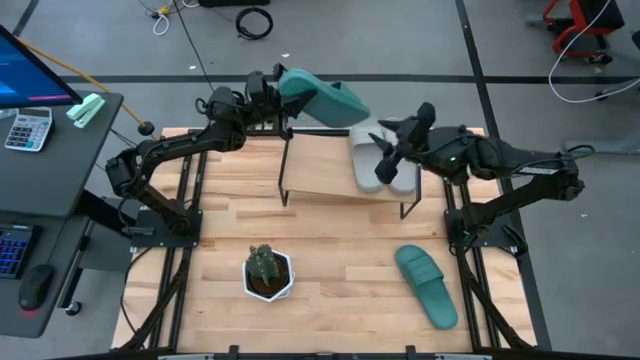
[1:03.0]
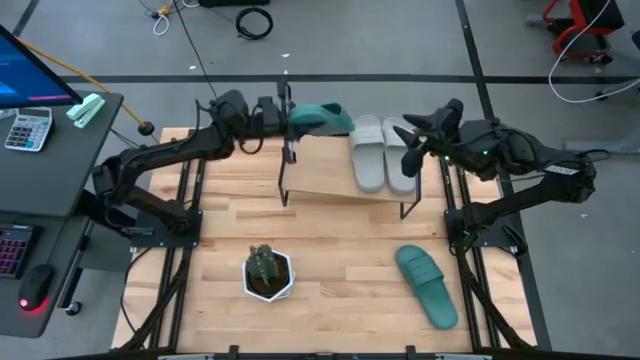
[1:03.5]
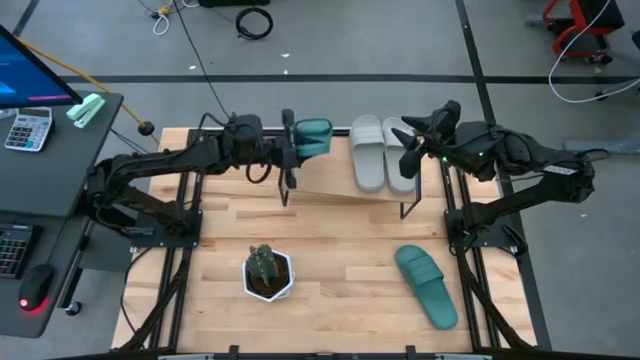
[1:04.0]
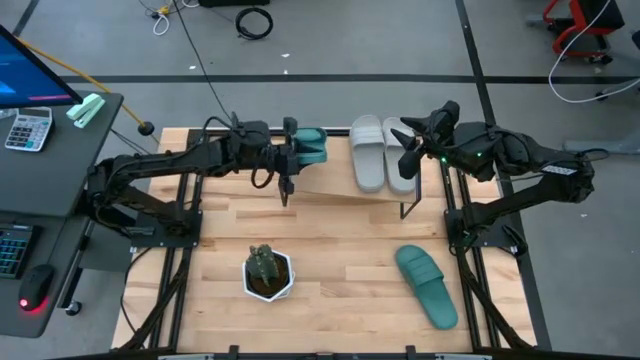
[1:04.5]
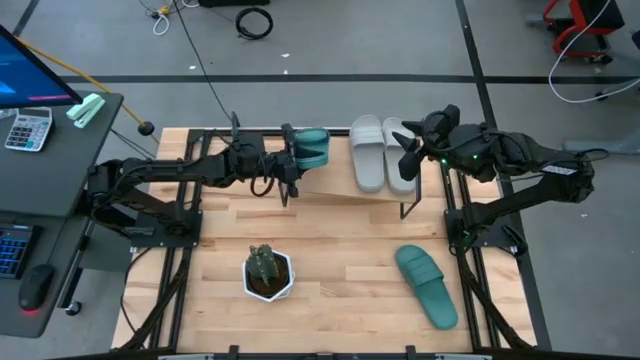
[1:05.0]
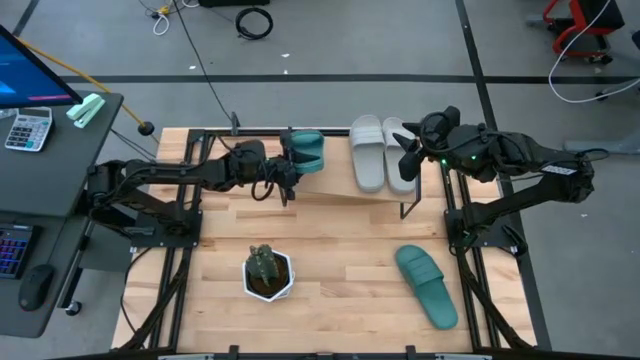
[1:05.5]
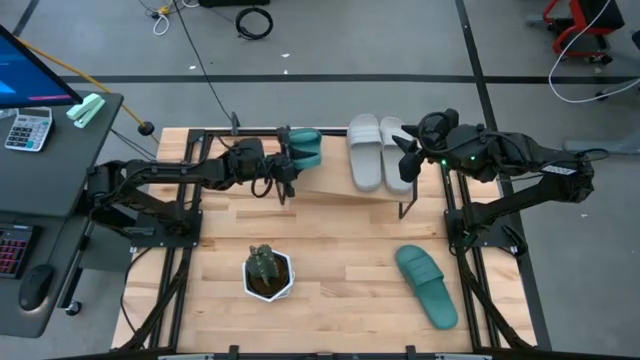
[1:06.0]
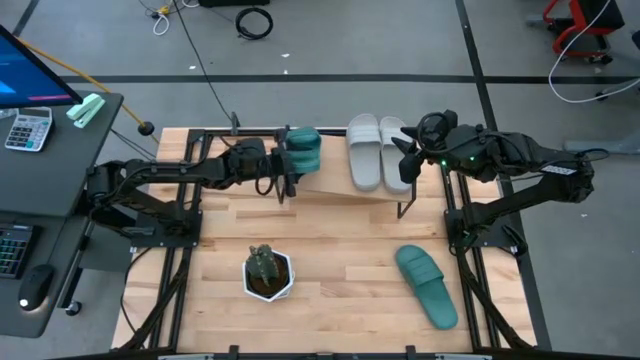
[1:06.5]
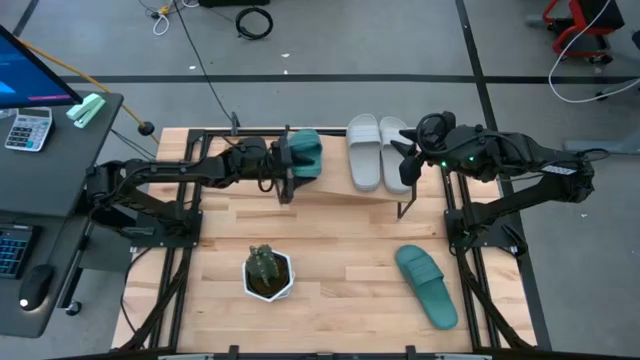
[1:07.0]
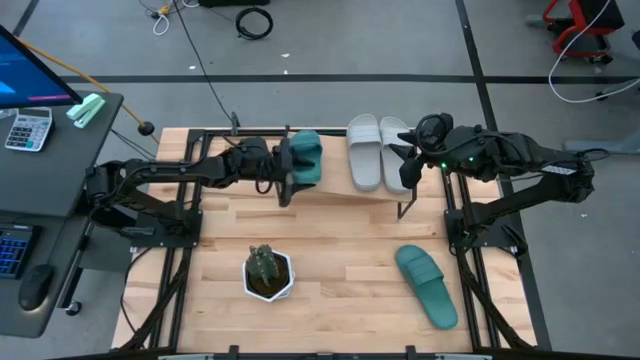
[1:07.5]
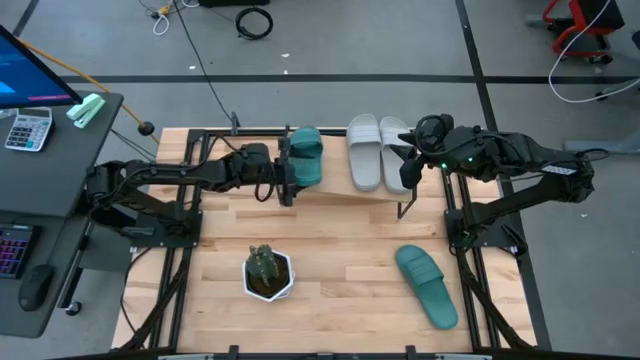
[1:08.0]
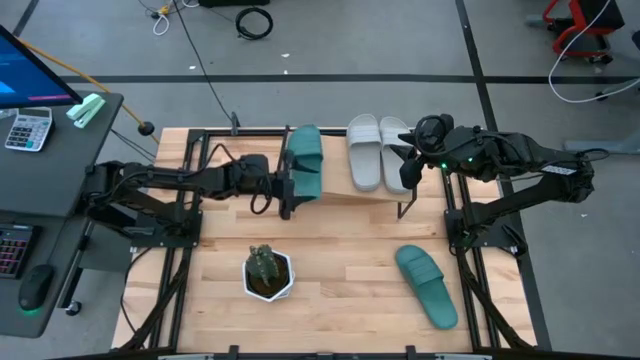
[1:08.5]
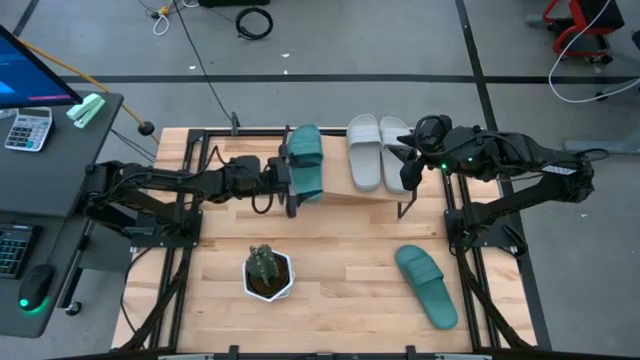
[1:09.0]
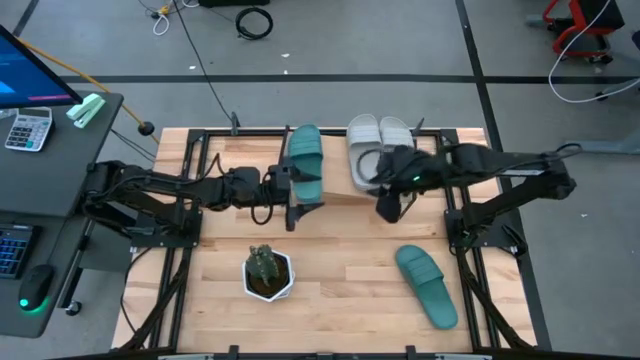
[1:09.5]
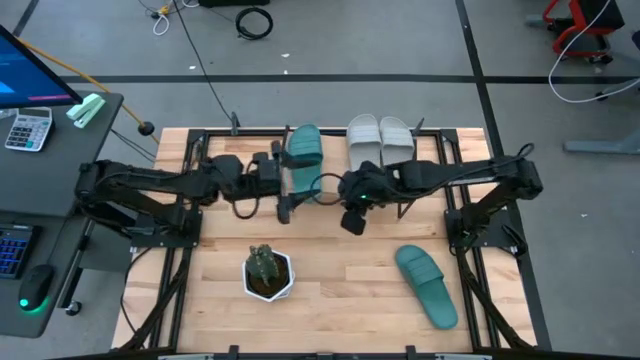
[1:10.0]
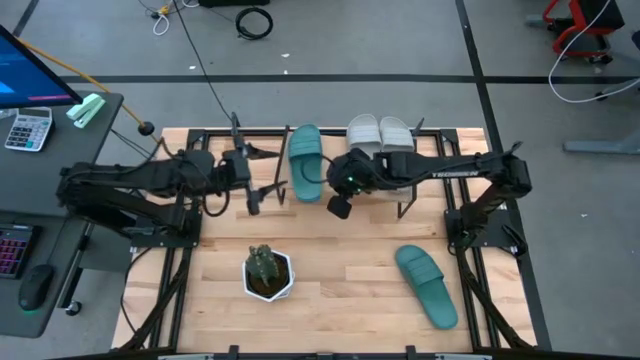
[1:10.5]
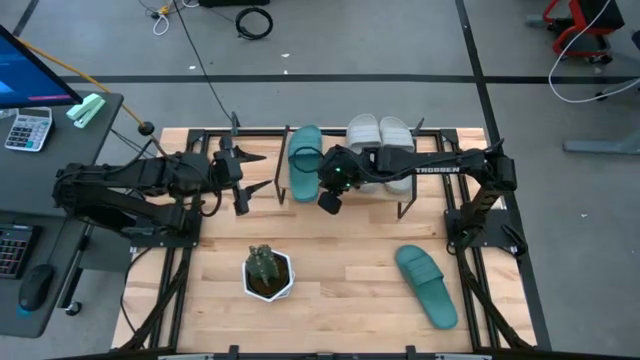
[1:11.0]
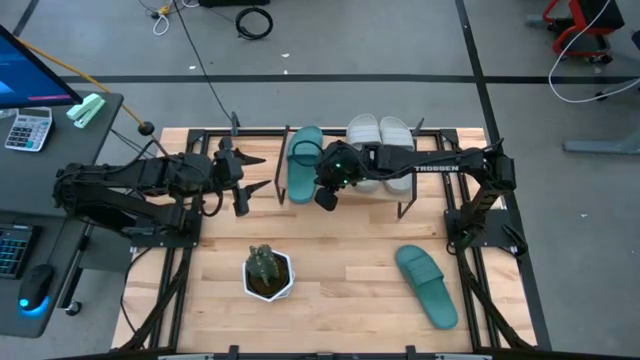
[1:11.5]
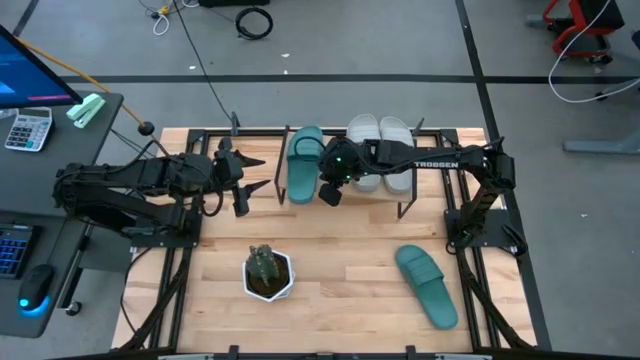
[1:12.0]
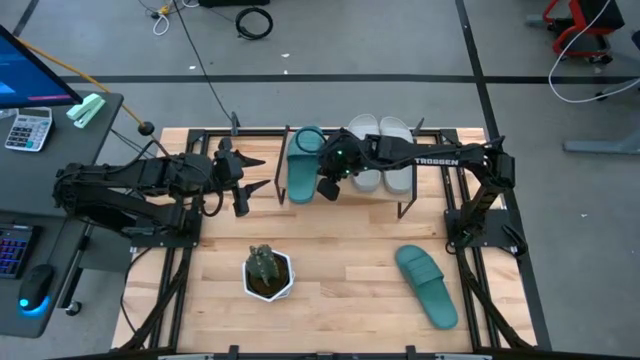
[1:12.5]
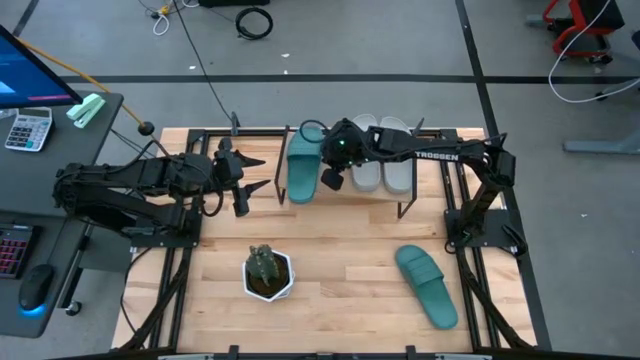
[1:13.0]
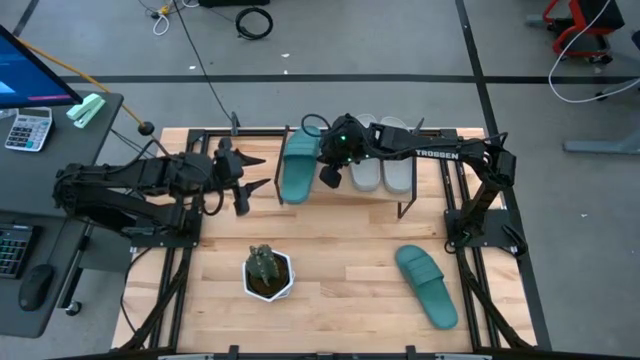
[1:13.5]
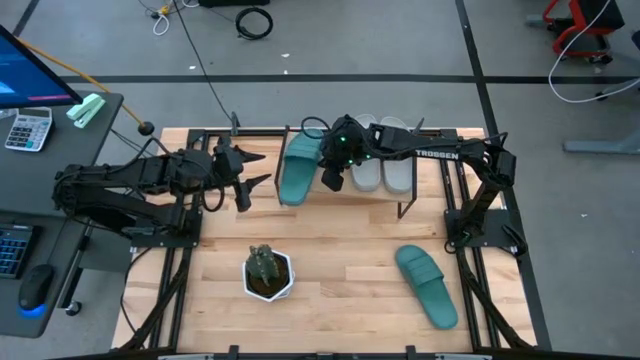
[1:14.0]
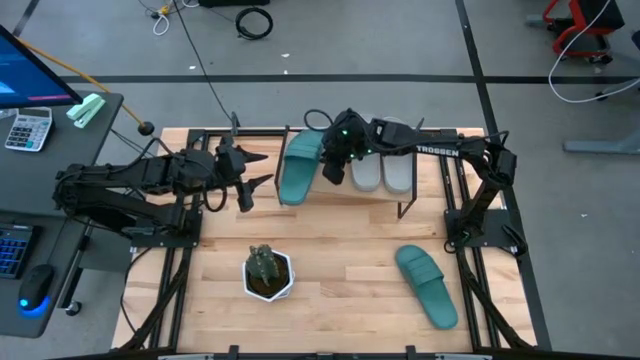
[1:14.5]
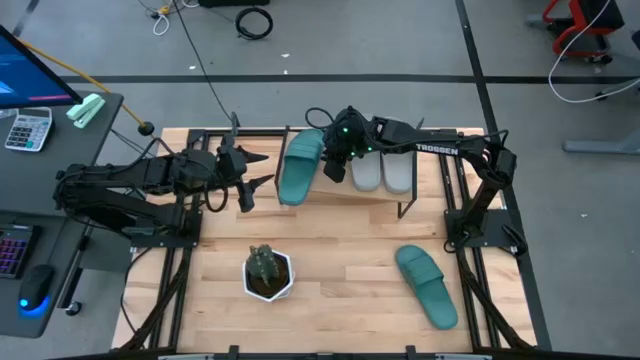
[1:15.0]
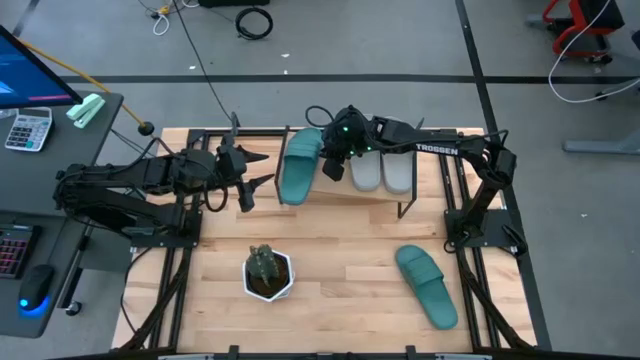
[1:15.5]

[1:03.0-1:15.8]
Task: Pick and place slides into the shelf
Put the left green slide on the shelf
